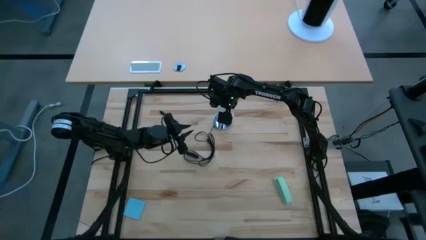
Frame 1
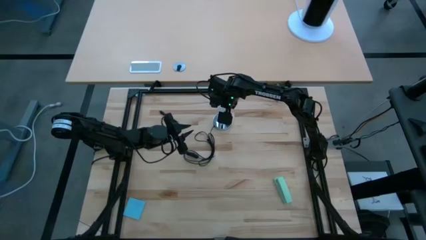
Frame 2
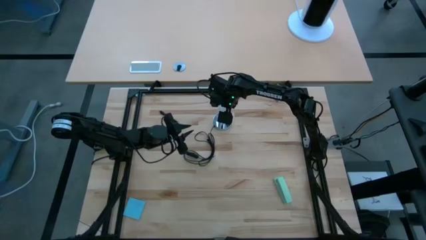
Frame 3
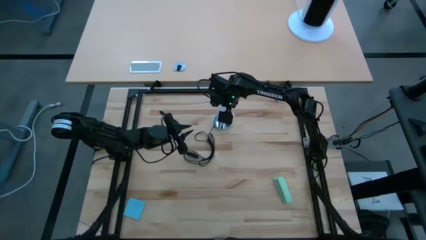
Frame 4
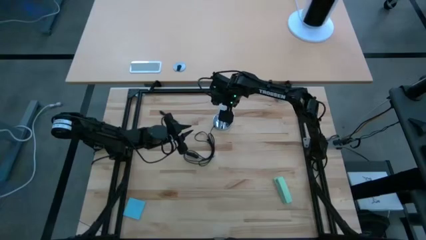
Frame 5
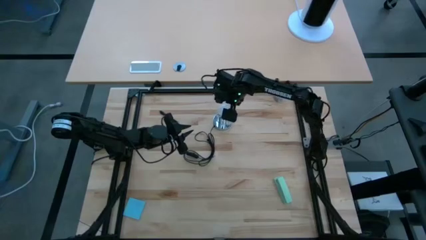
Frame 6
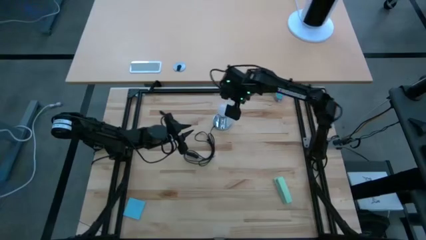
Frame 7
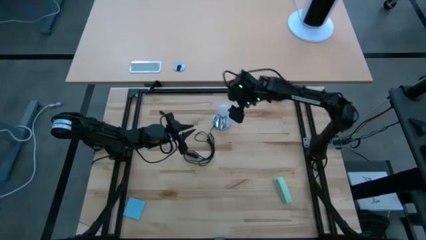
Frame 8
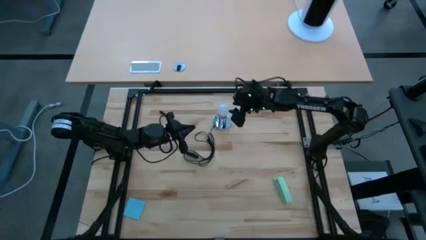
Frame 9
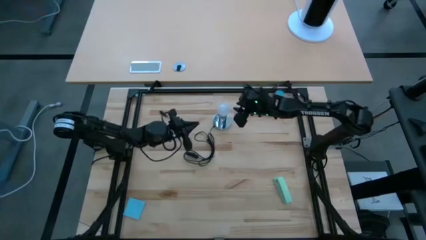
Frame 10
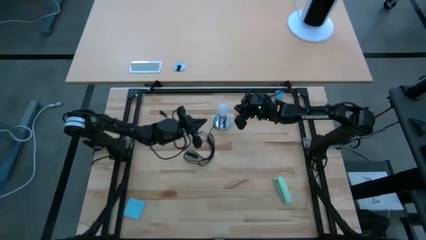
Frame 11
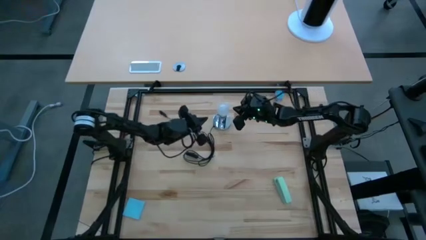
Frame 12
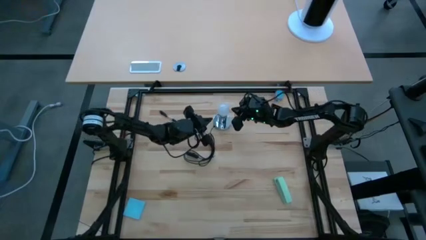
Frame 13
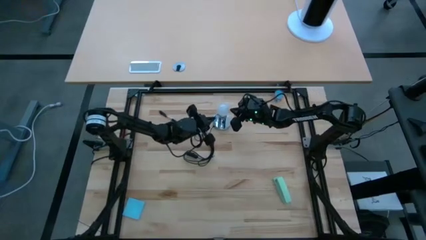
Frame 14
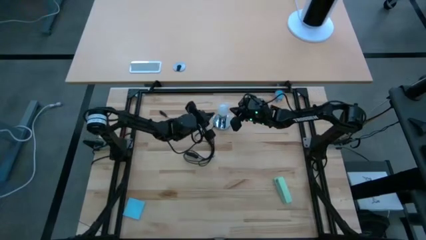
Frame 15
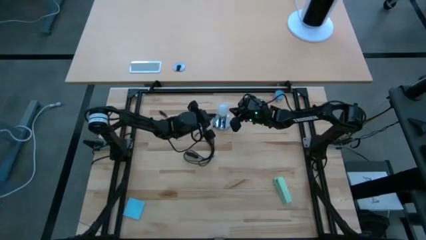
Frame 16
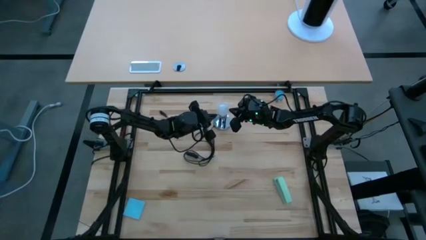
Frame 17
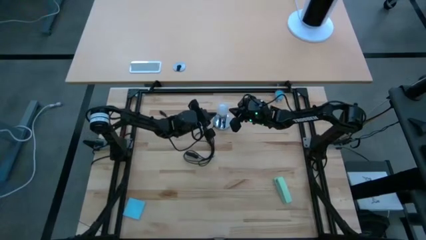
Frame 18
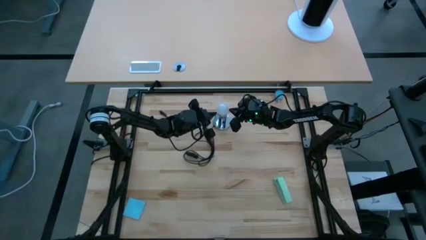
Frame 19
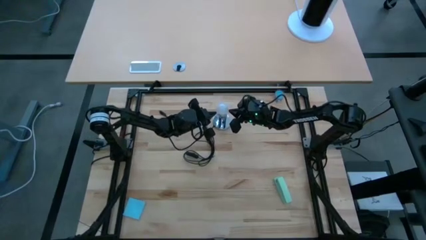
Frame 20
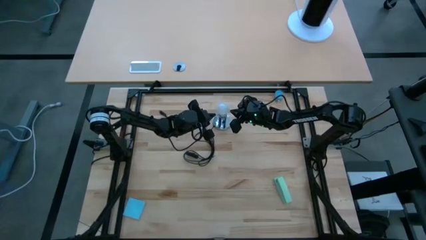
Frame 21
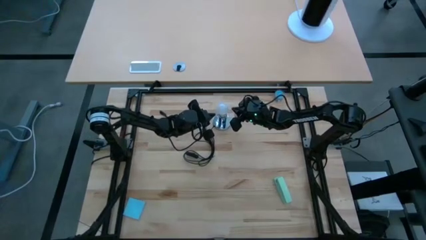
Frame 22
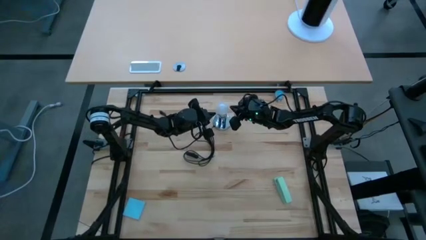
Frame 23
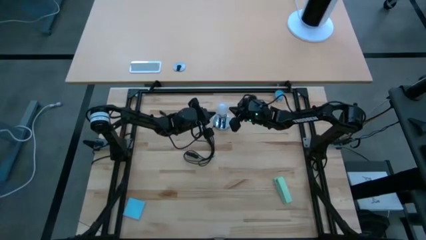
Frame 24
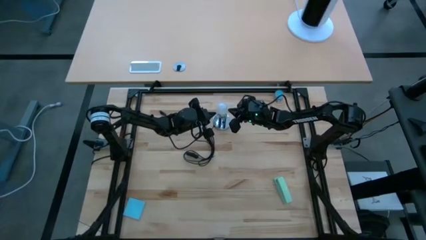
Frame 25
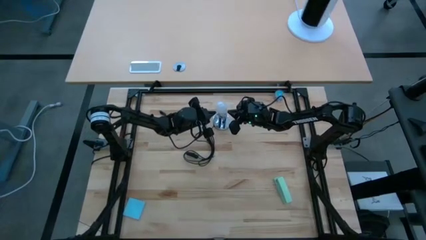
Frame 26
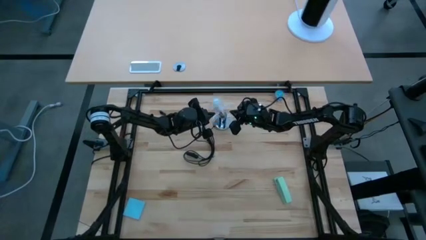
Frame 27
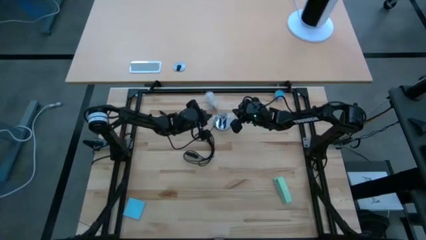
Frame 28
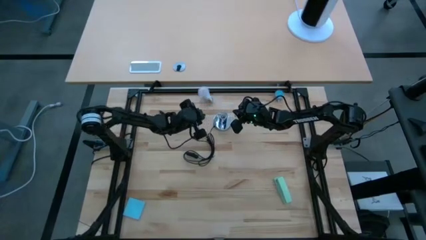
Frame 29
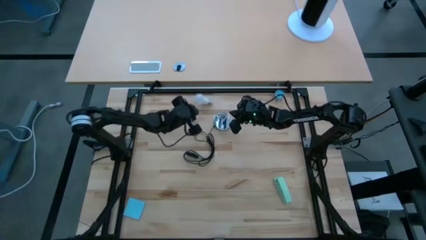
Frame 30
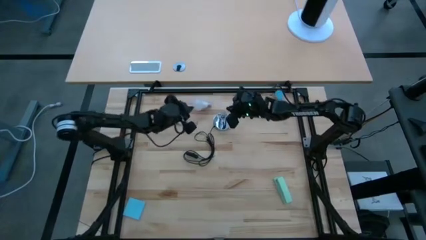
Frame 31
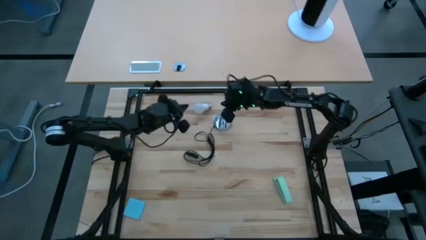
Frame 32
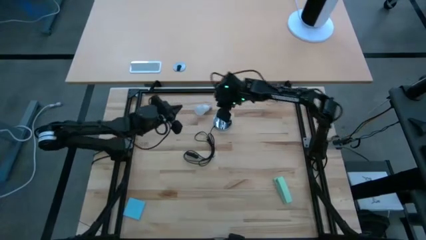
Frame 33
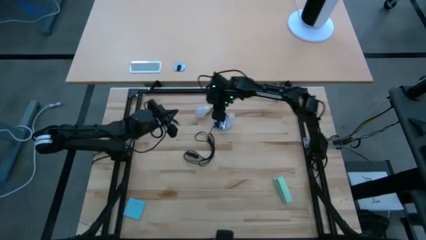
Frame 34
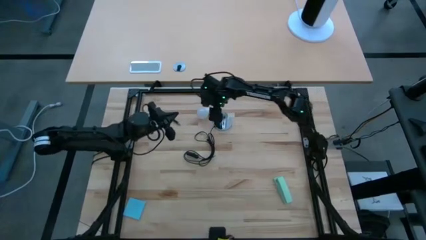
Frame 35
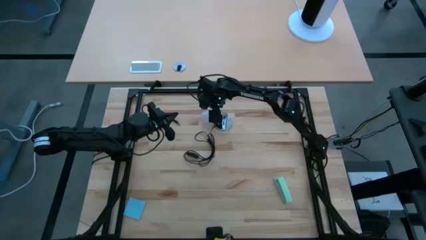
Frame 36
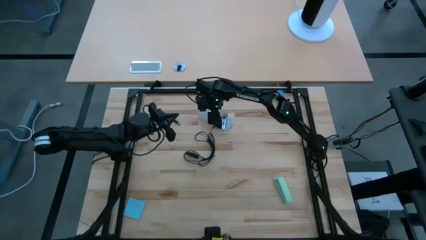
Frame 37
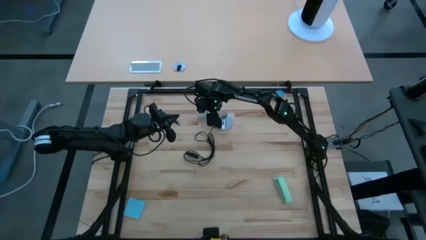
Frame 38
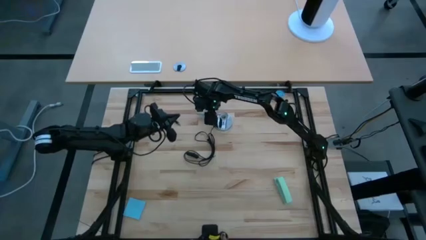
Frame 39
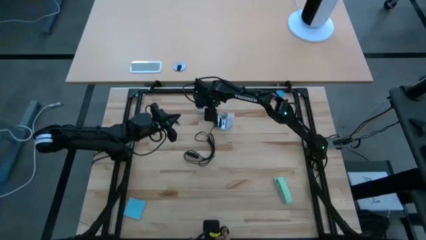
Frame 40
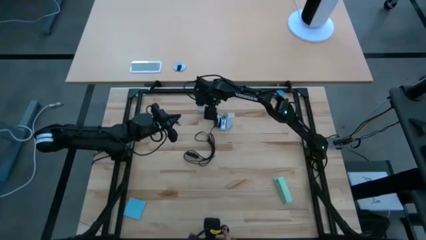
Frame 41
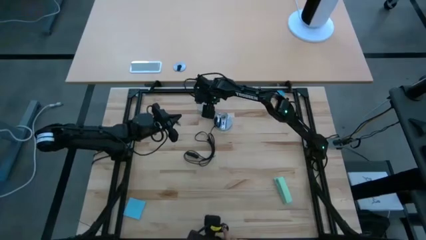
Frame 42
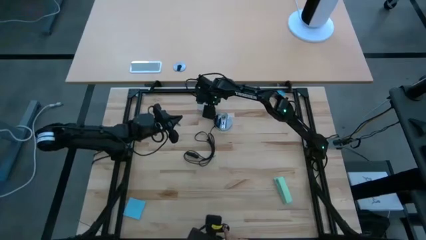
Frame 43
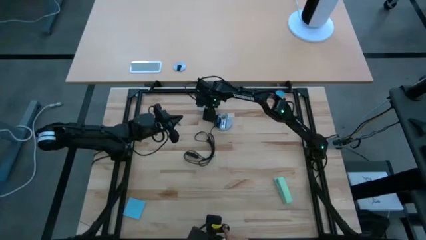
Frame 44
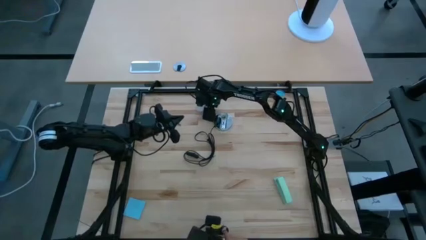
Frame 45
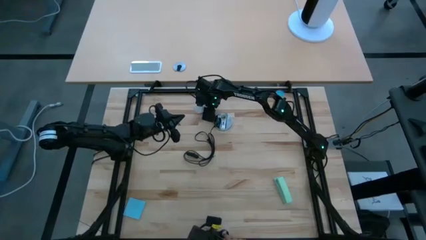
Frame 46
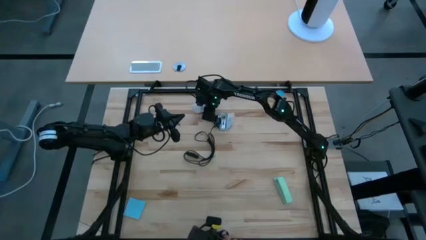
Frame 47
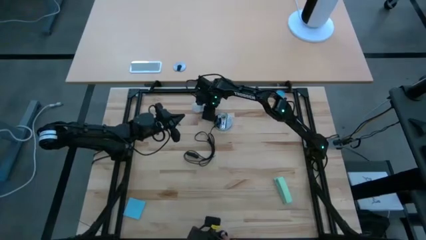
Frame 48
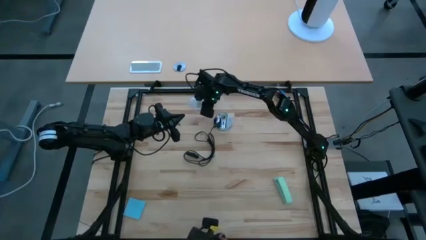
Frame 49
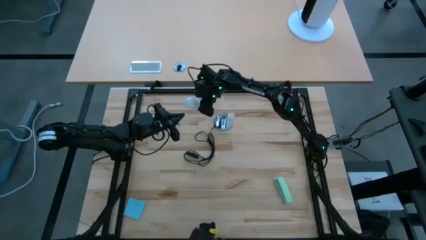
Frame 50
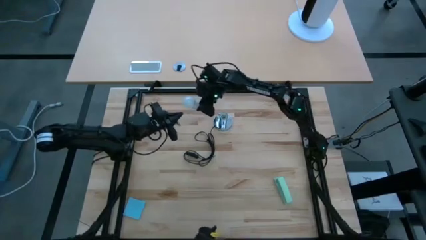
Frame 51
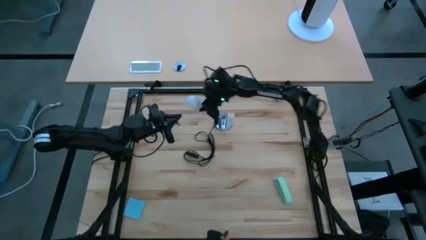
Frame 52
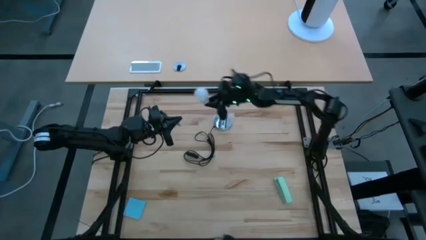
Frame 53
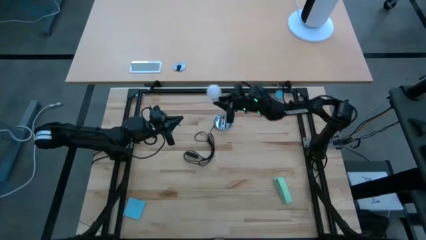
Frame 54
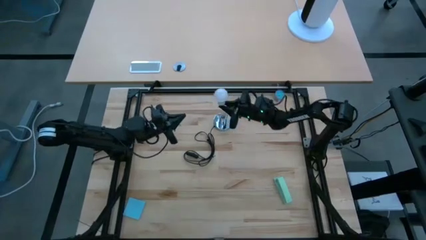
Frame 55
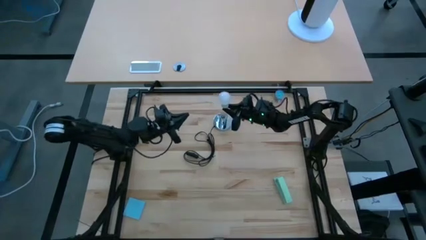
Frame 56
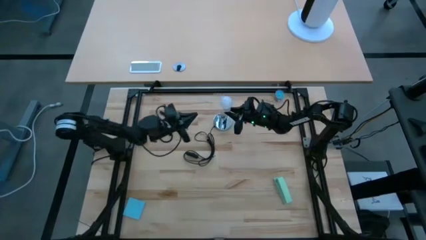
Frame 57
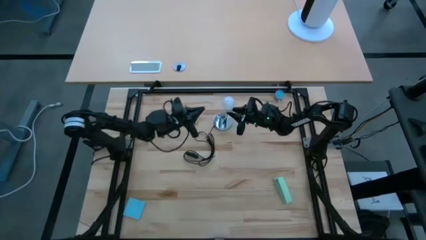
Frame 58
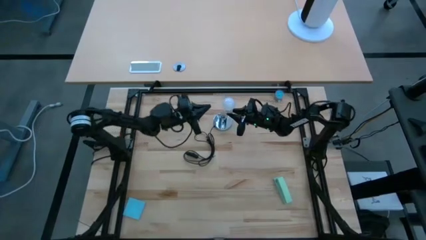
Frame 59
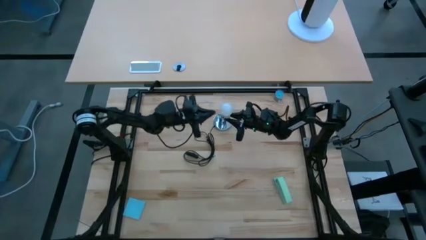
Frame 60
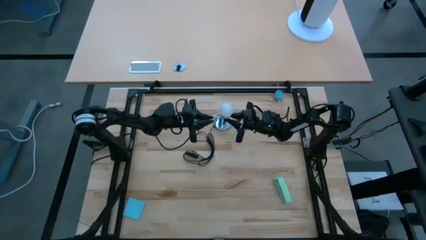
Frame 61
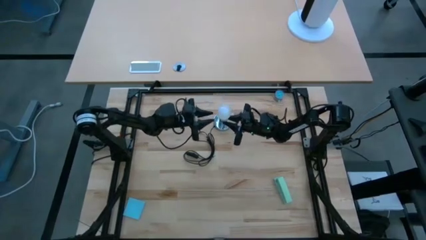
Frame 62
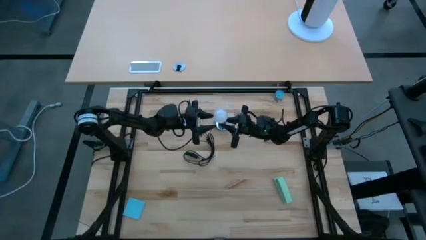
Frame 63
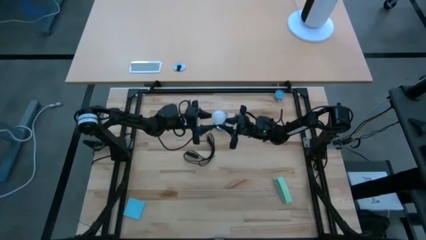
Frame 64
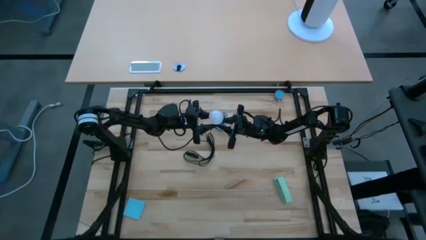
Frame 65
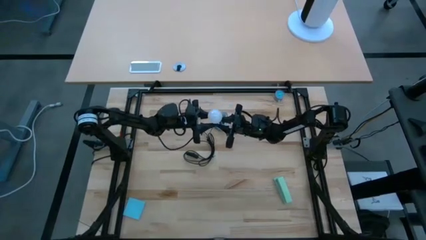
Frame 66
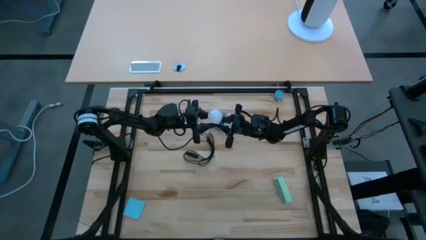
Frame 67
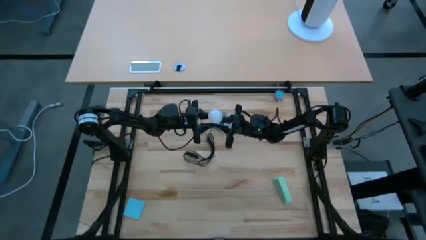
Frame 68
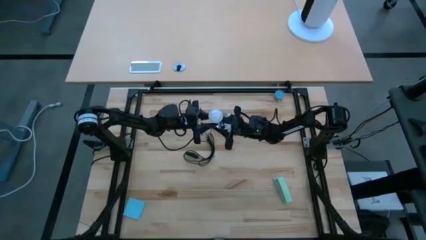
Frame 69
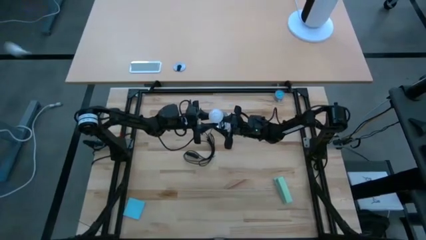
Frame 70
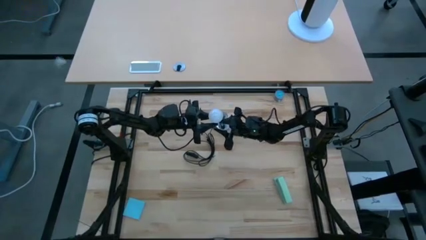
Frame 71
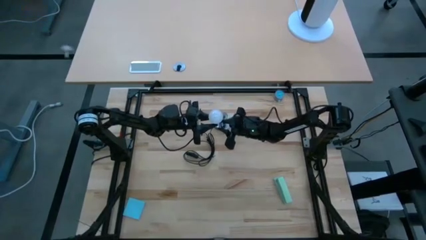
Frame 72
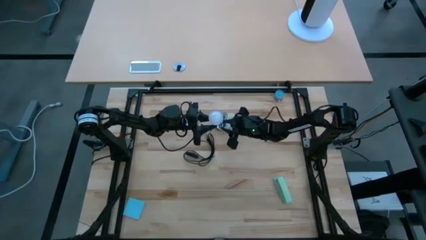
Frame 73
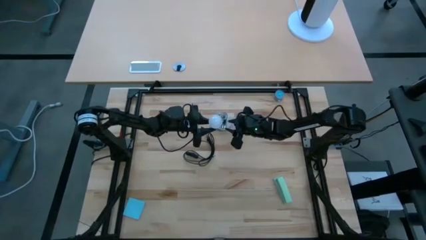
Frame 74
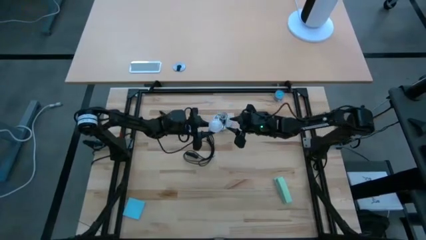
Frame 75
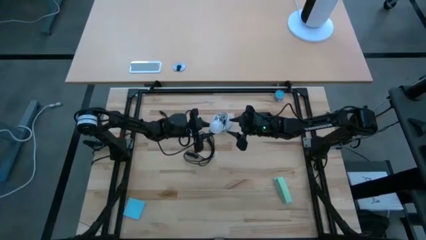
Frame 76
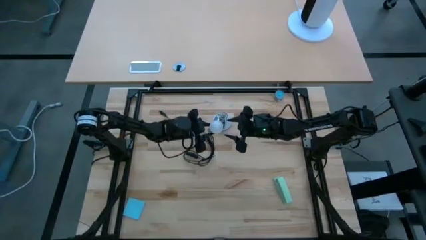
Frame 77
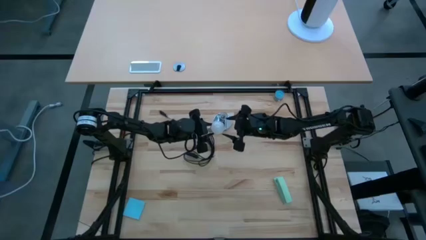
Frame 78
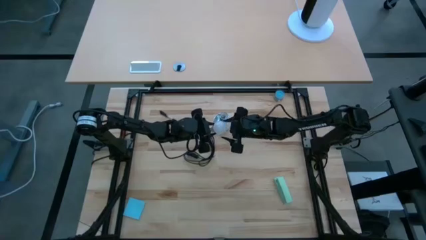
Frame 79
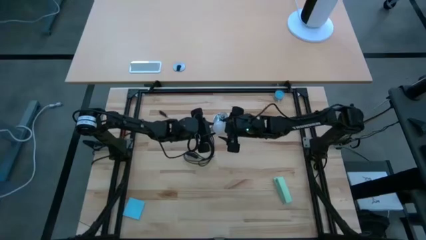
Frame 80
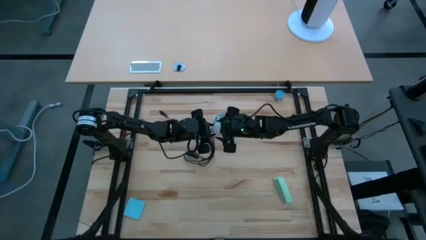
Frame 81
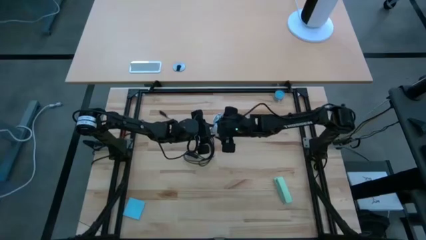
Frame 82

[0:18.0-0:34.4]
Task: Screw lightbulb
Insert the lightbulb into the lamp
